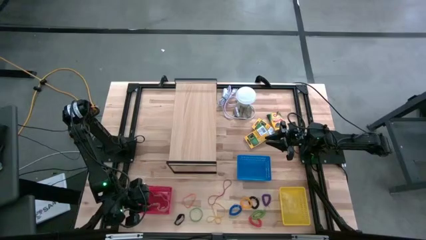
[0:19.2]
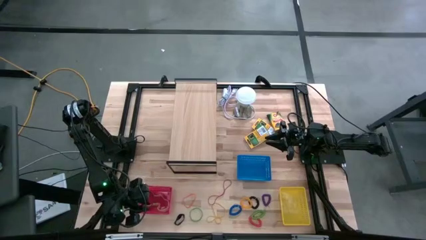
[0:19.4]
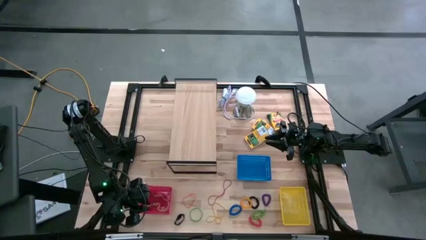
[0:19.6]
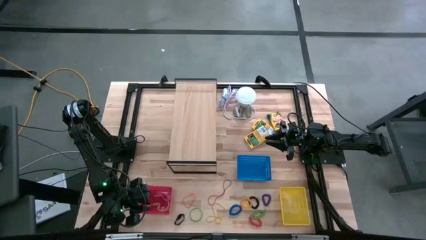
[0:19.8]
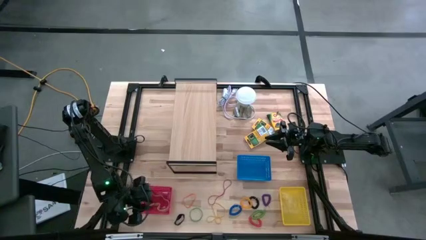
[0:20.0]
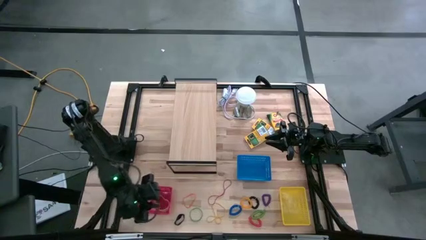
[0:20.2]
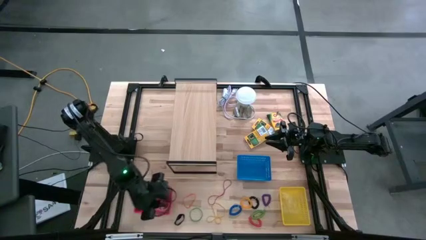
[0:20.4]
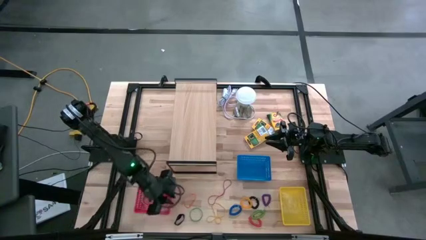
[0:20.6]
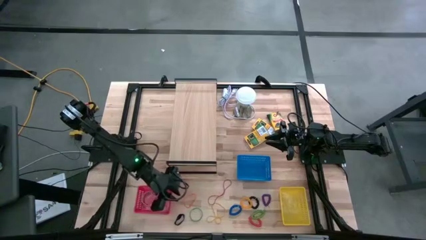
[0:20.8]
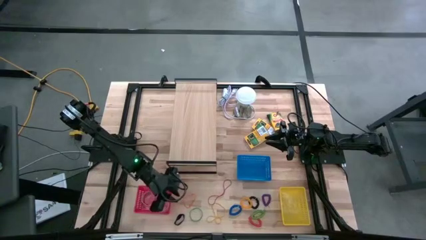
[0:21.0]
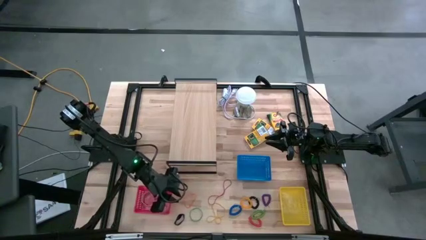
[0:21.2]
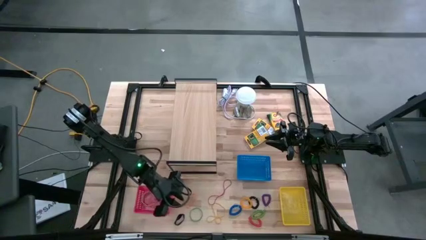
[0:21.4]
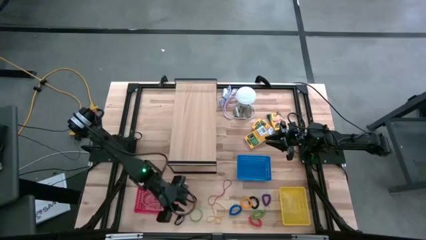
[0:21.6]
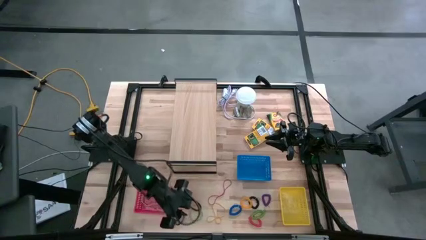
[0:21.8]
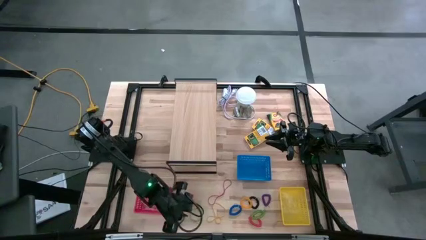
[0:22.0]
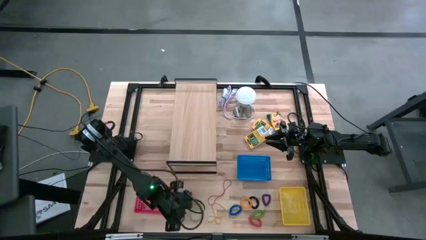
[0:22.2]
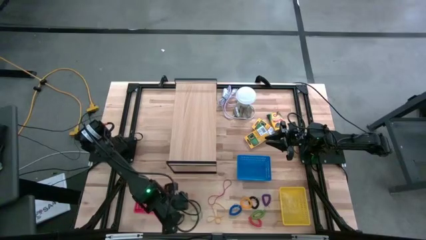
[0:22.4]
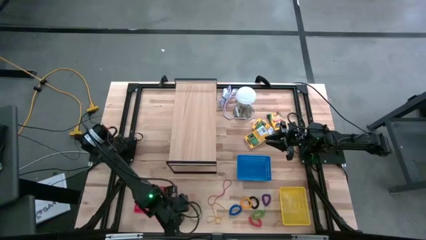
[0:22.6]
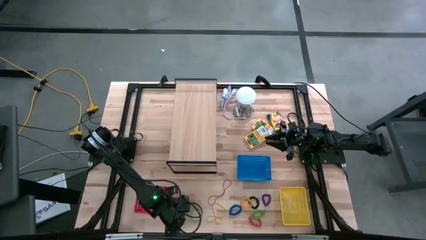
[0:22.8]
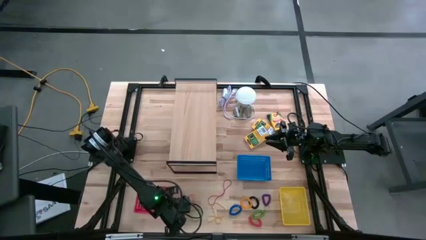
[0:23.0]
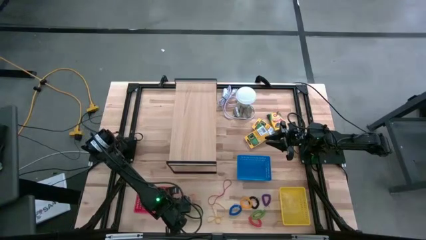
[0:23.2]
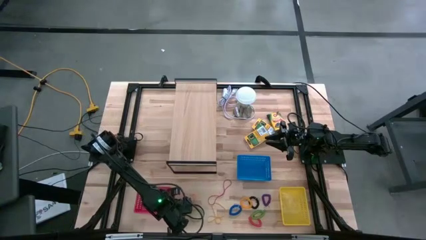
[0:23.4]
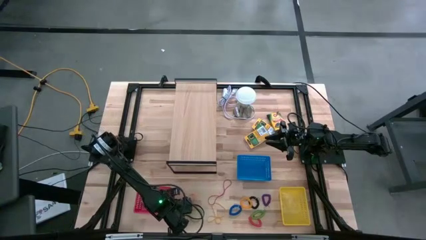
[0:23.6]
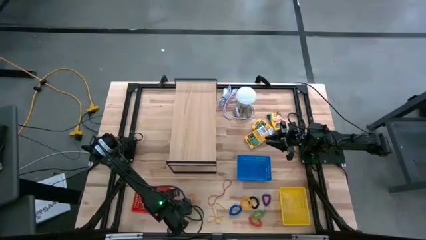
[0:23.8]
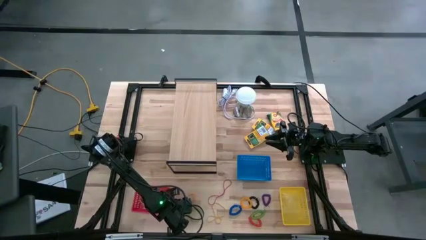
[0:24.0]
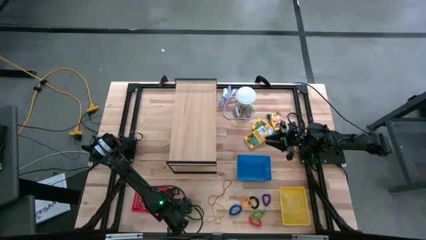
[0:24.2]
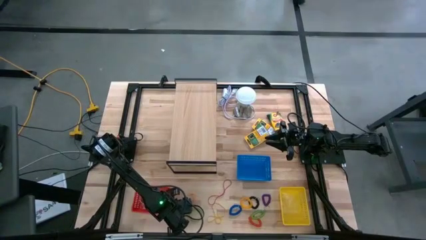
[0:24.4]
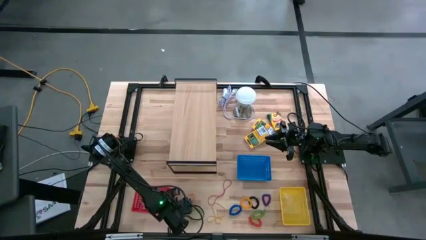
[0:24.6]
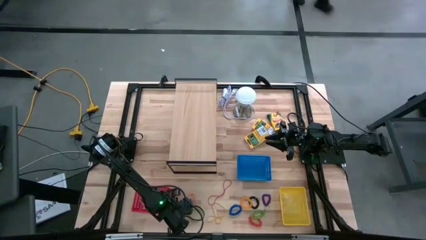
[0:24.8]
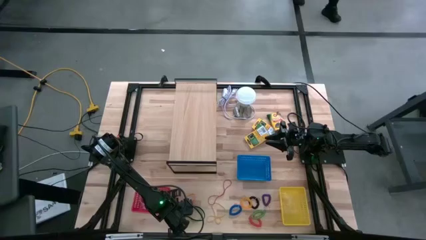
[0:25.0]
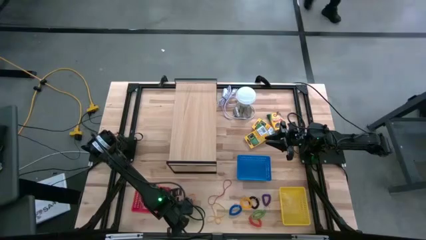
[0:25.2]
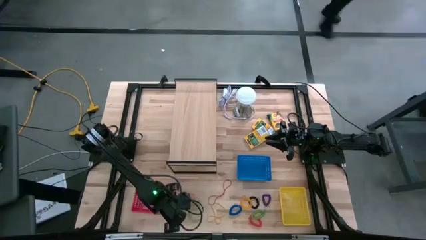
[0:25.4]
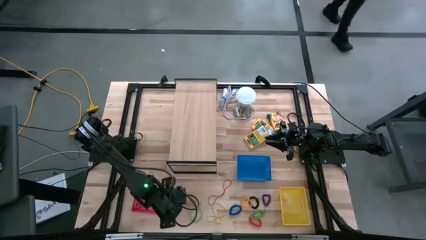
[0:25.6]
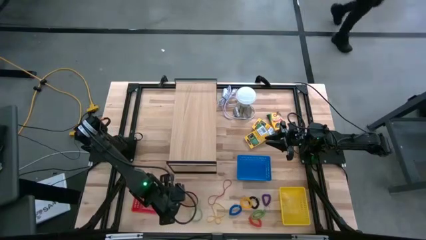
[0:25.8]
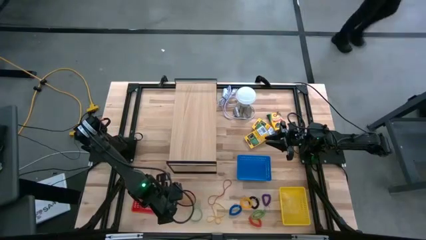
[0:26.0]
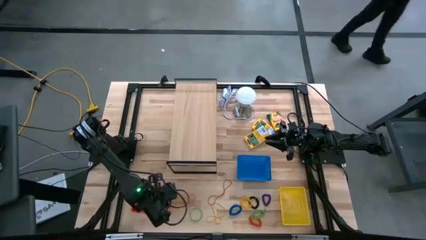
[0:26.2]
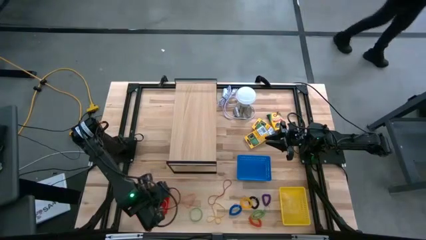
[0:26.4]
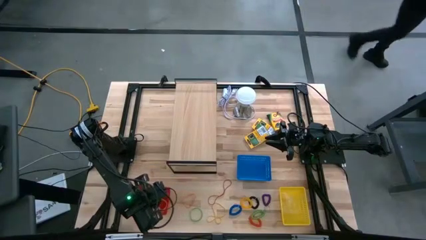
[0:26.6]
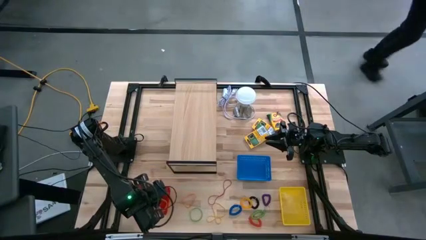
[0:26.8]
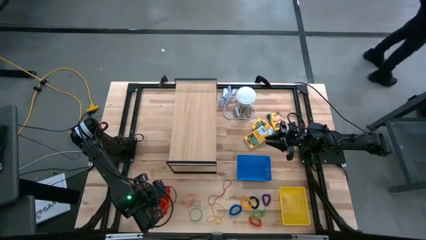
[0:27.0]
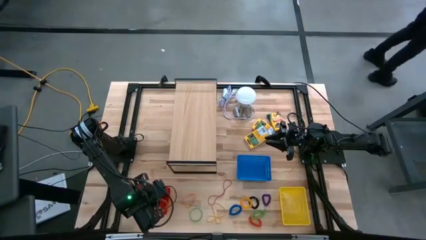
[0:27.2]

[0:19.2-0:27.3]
Task: Pick & Place Office Desk Supplies
Put the black rubber band into the red bin

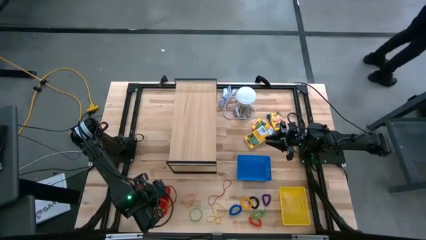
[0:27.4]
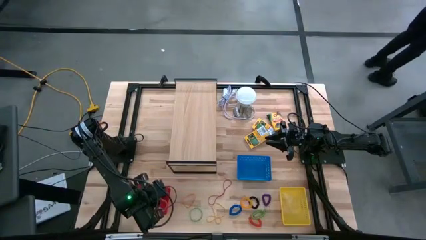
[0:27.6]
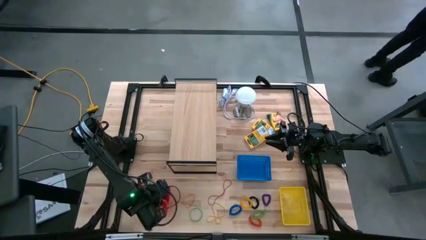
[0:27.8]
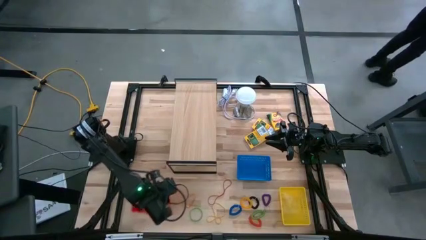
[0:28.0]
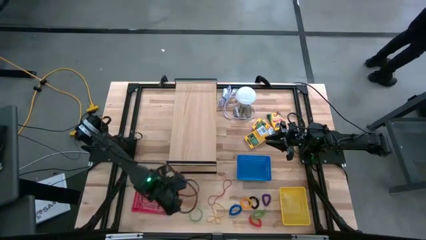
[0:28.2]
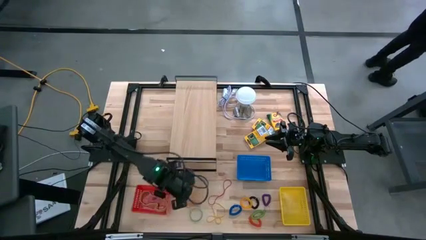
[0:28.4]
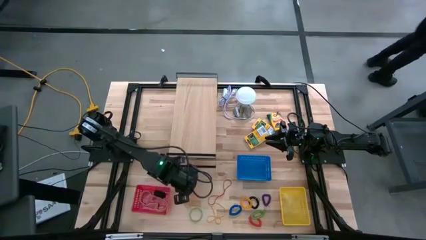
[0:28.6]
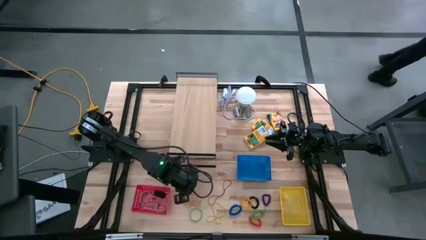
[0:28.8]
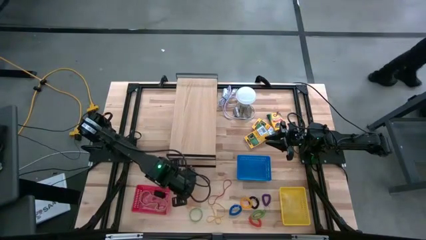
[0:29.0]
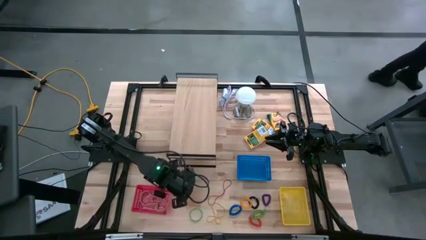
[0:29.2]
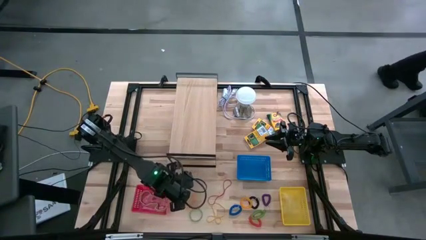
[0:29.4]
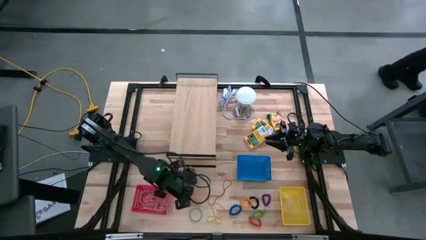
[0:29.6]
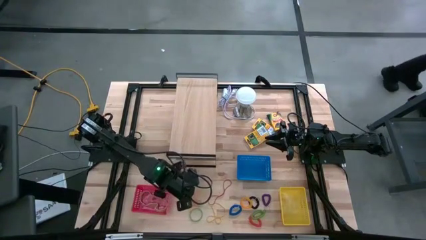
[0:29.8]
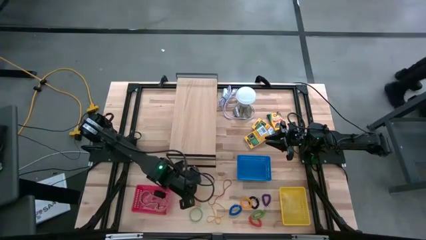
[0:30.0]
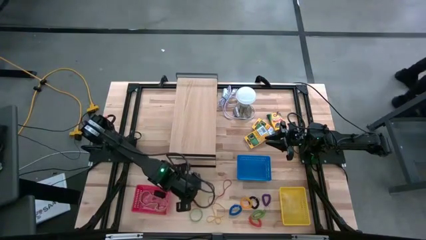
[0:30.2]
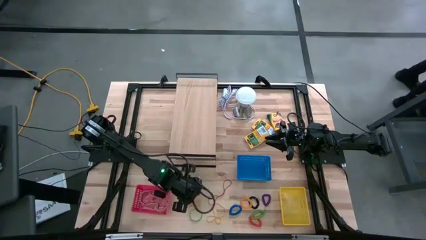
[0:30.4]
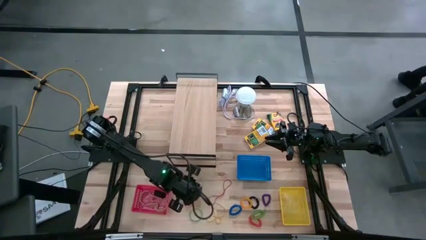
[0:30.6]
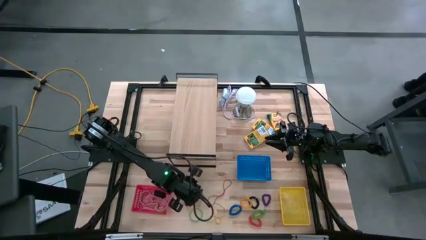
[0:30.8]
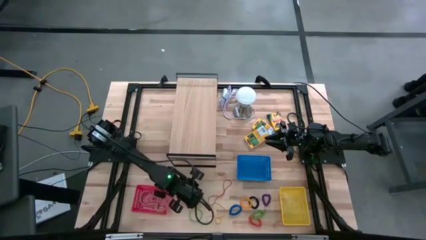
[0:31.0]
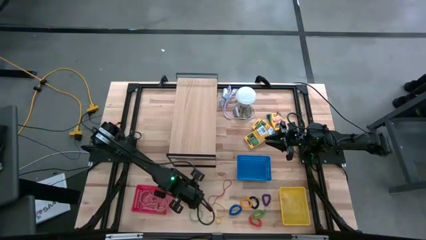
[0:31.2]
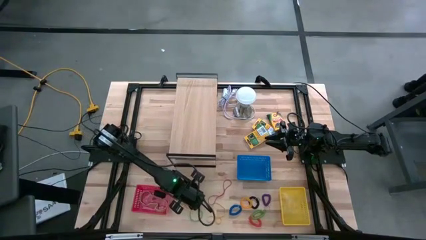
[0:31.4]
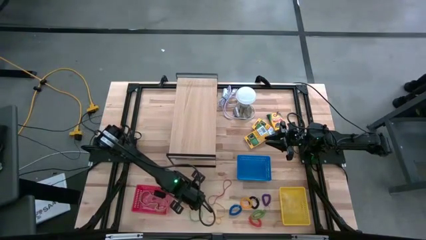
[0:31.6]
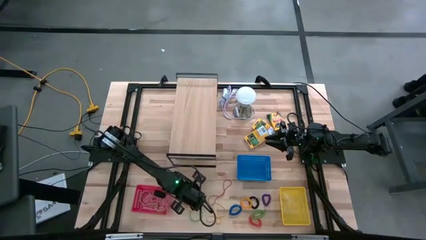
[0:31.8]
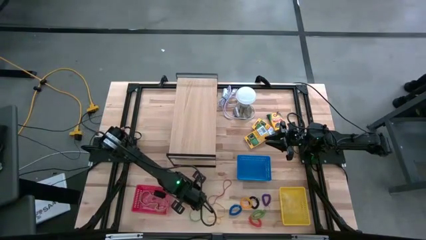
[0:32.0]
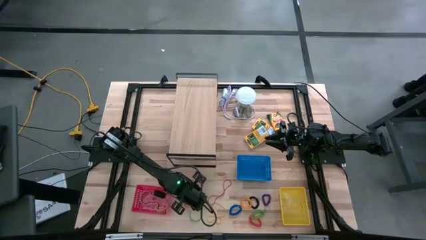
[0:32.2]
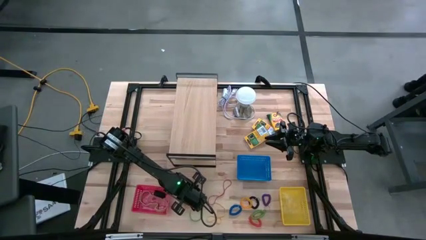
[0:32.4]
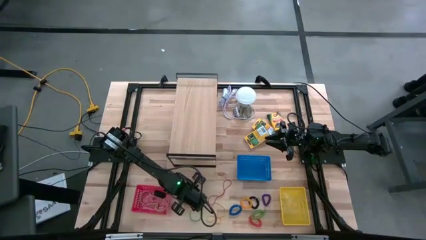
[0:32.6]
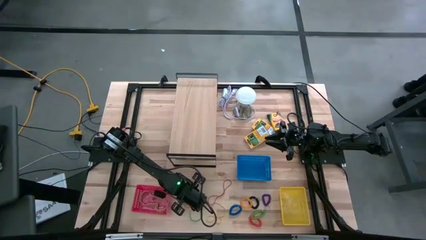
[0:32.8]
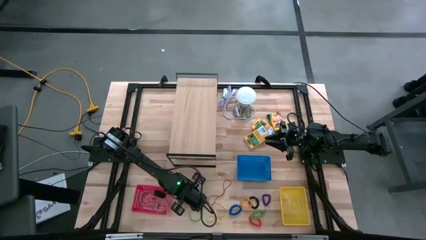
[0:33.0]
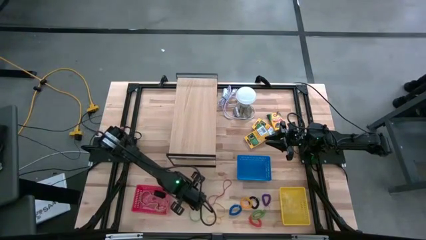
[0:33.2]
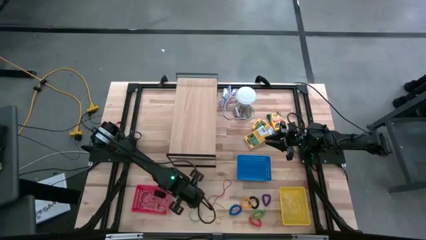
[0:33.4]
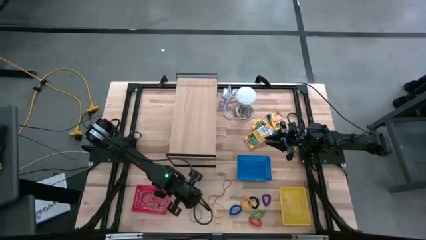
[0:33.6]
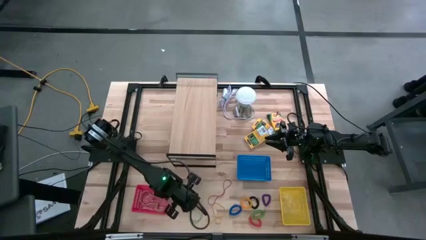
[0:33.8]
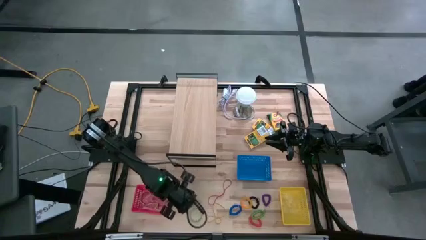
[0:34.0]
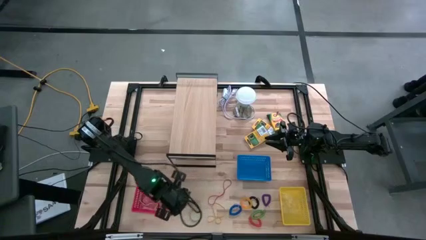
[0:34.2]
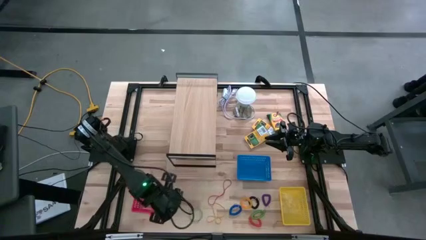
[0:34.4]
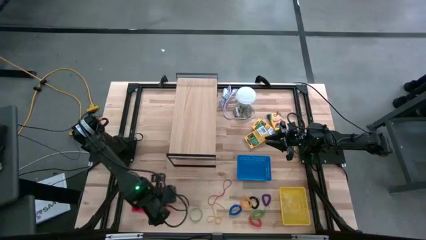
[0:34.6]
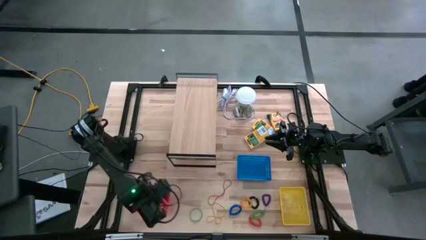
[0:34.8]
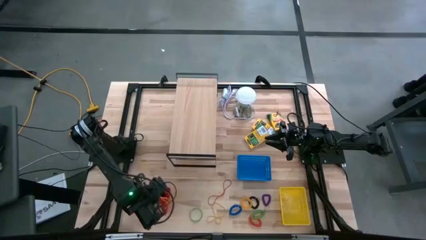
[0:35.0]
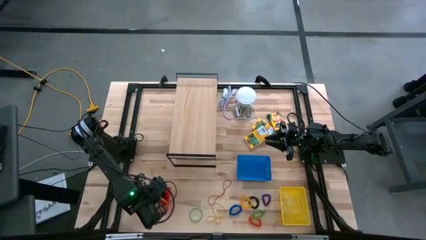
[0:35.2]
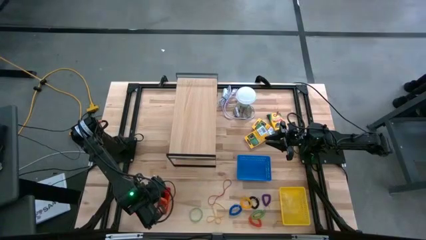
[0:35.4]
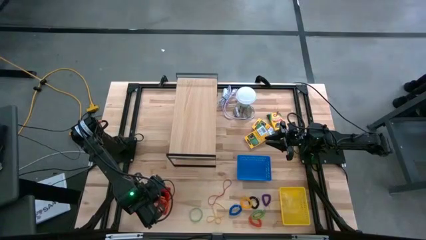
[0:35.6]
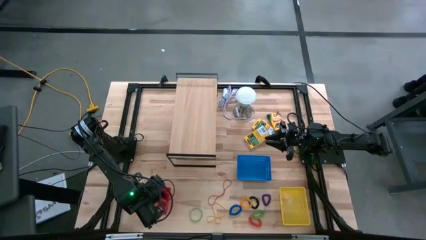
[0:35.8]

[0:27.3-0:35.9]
Put the orange rubber band into the red bin
